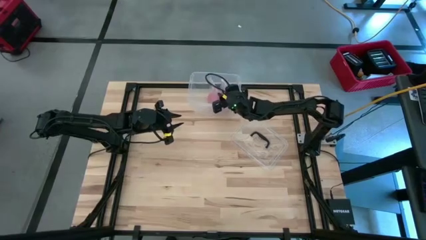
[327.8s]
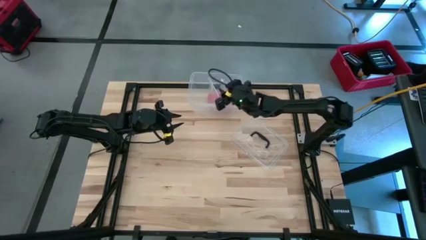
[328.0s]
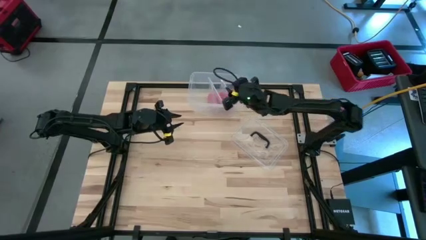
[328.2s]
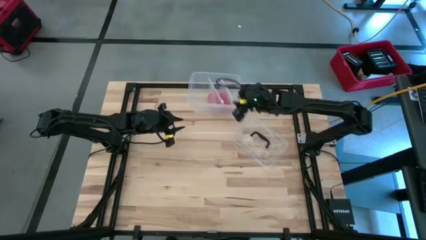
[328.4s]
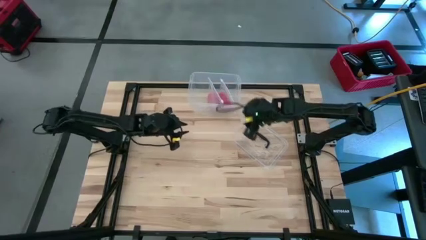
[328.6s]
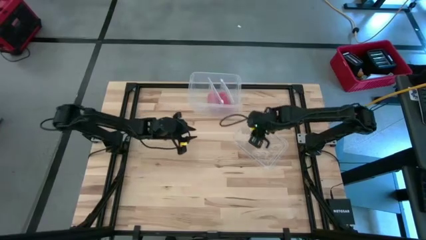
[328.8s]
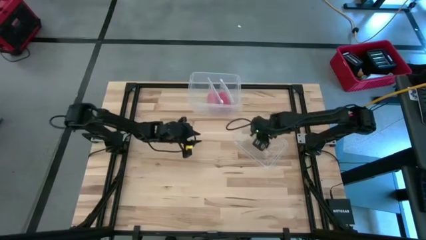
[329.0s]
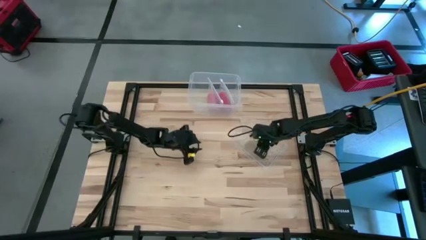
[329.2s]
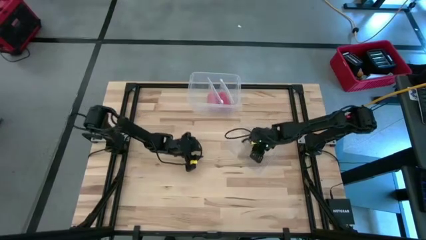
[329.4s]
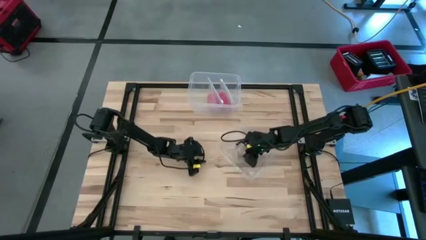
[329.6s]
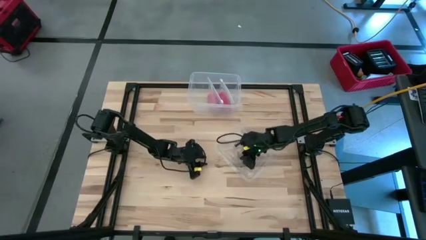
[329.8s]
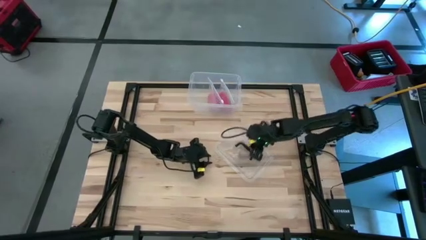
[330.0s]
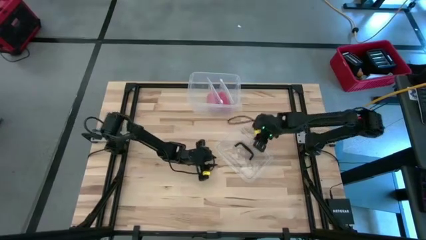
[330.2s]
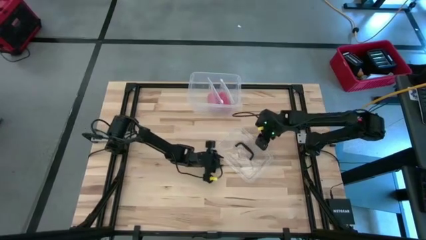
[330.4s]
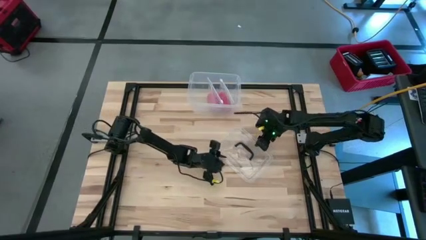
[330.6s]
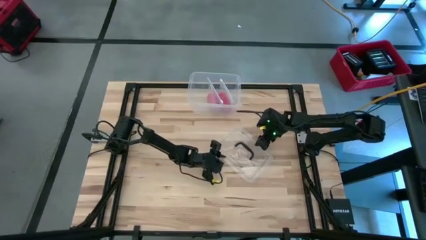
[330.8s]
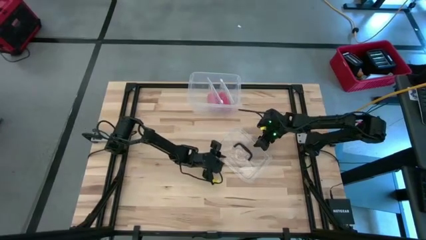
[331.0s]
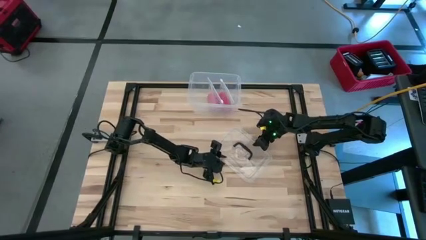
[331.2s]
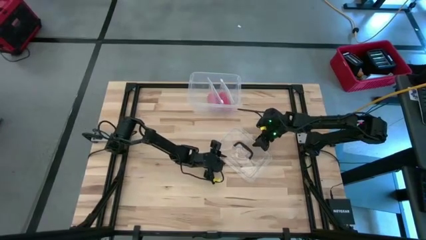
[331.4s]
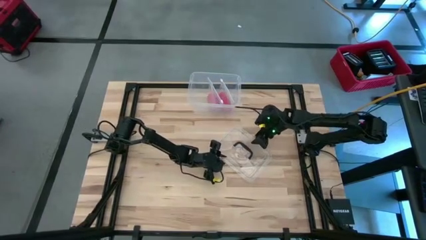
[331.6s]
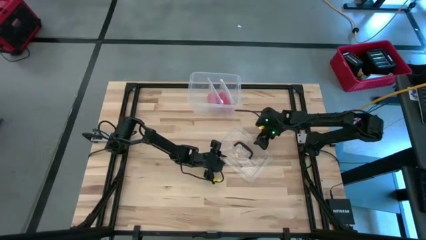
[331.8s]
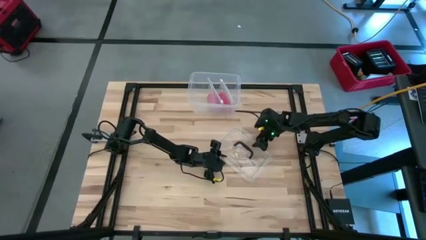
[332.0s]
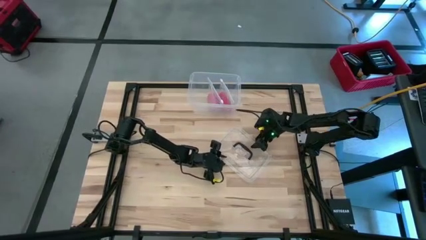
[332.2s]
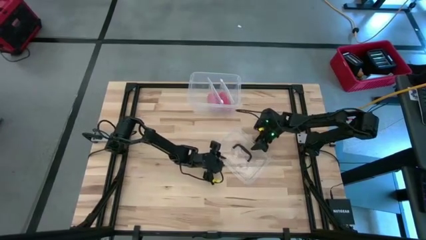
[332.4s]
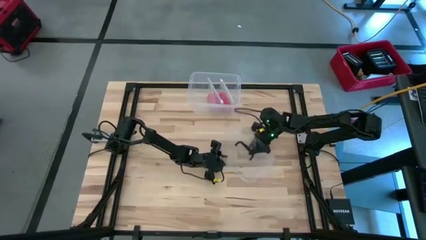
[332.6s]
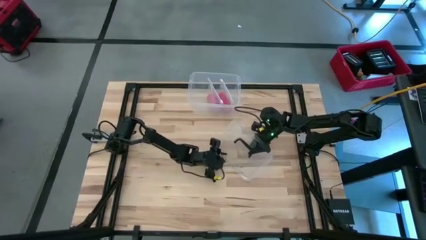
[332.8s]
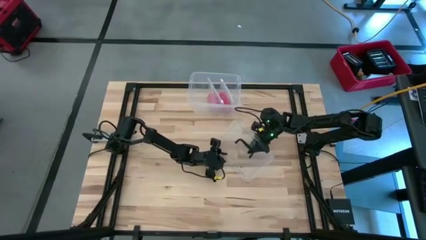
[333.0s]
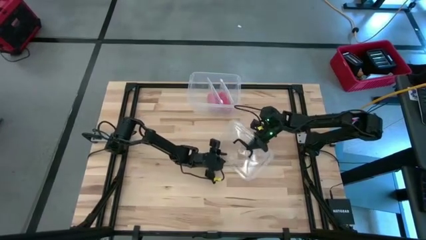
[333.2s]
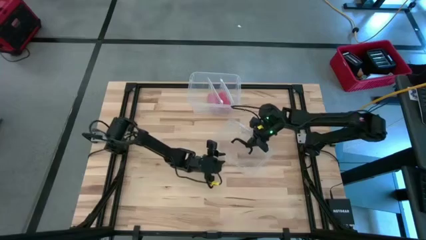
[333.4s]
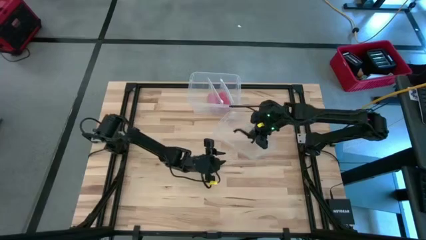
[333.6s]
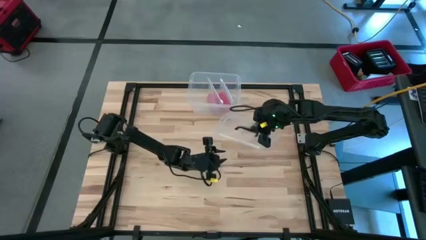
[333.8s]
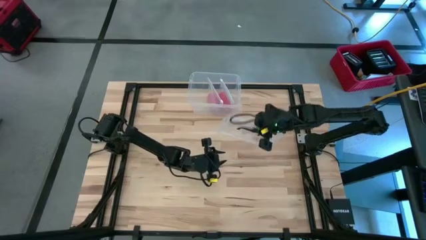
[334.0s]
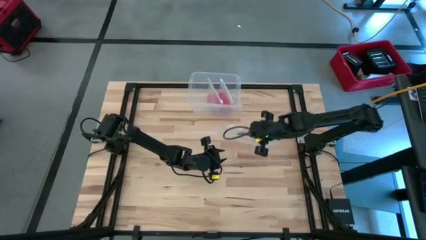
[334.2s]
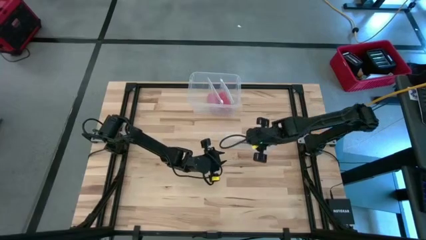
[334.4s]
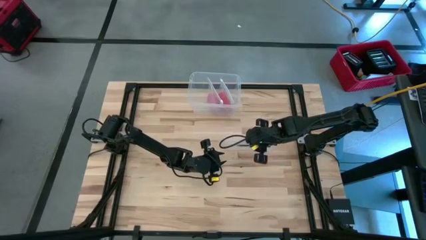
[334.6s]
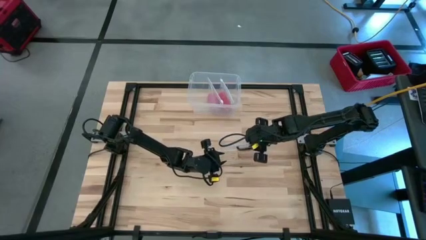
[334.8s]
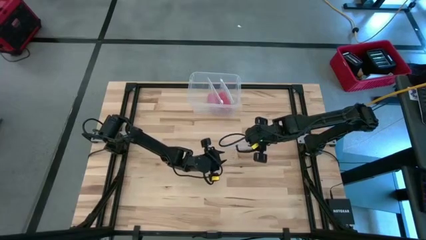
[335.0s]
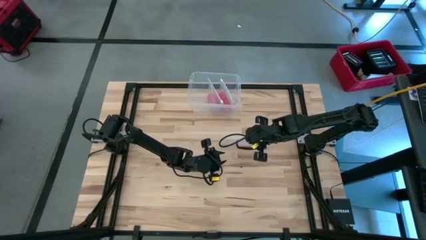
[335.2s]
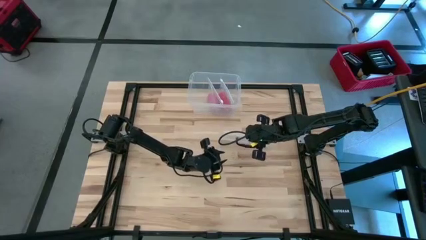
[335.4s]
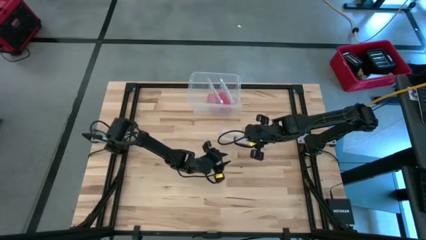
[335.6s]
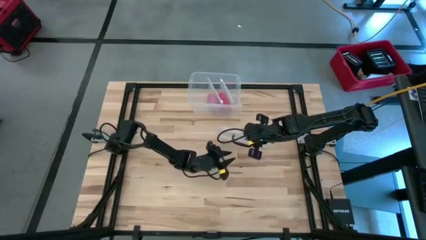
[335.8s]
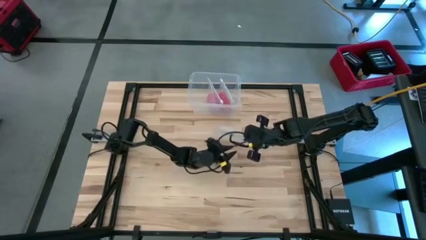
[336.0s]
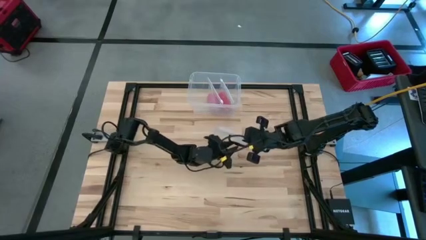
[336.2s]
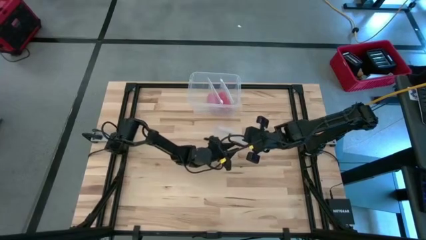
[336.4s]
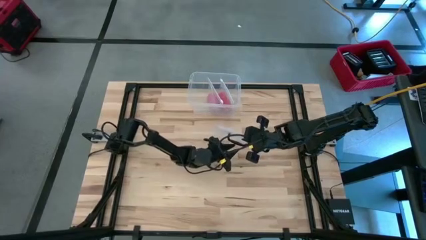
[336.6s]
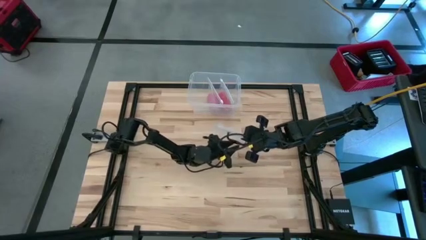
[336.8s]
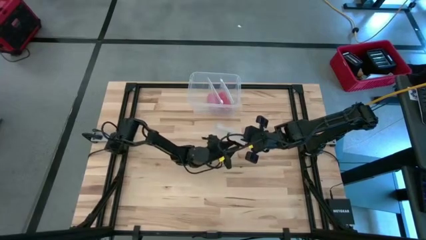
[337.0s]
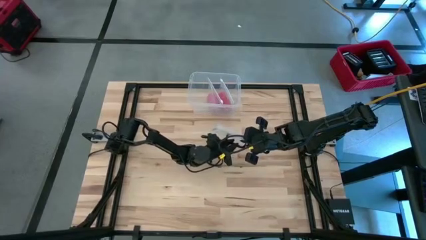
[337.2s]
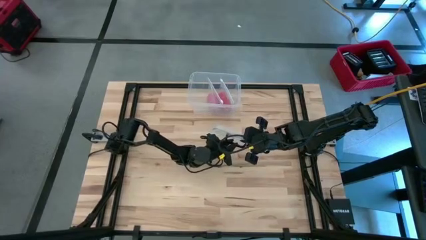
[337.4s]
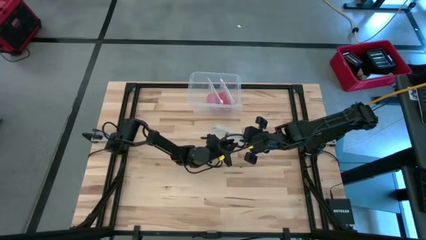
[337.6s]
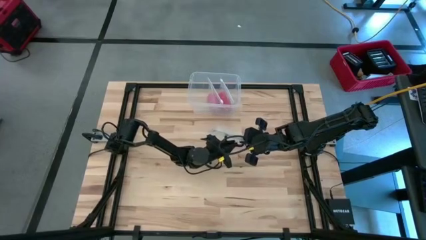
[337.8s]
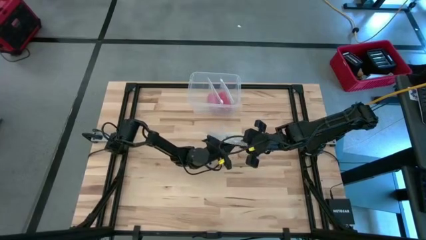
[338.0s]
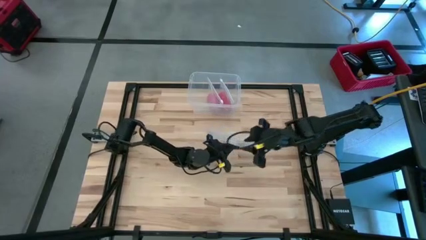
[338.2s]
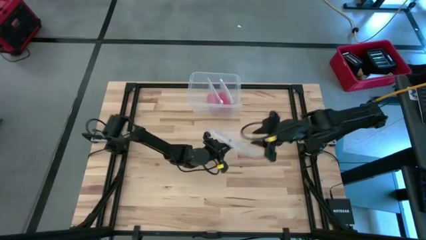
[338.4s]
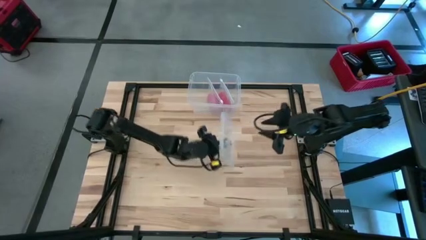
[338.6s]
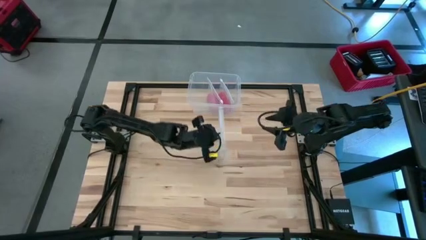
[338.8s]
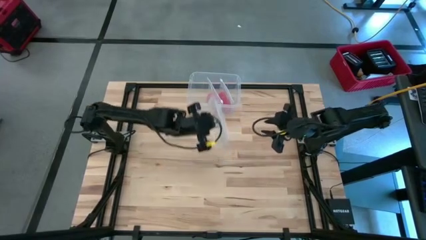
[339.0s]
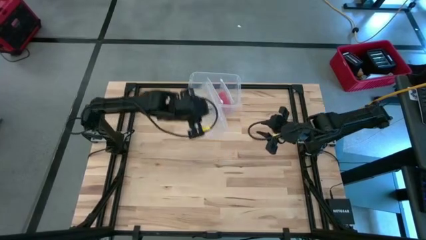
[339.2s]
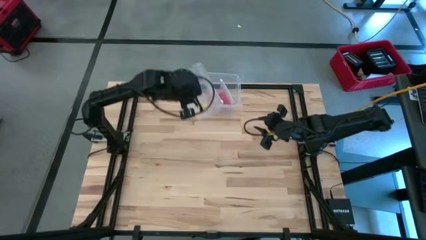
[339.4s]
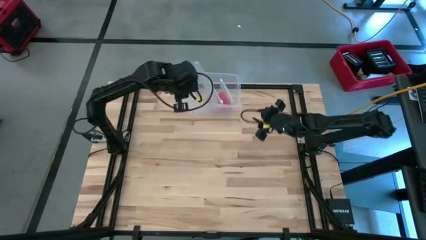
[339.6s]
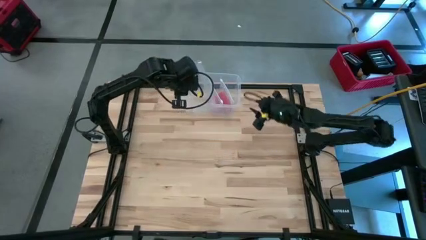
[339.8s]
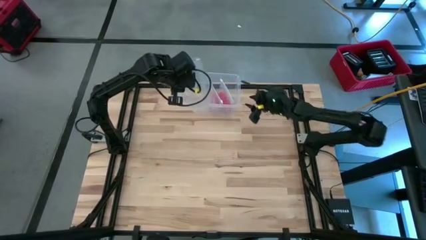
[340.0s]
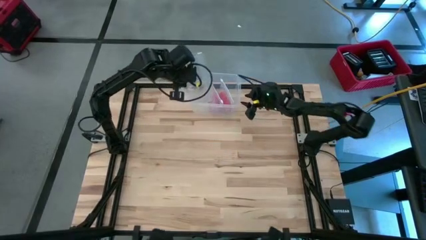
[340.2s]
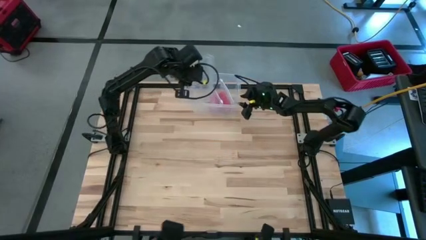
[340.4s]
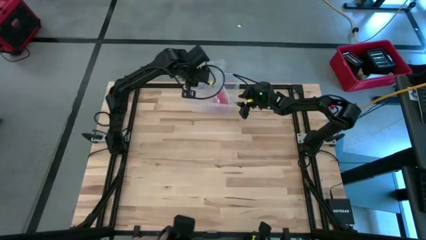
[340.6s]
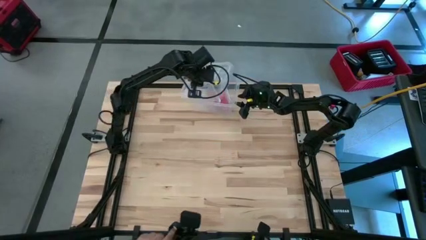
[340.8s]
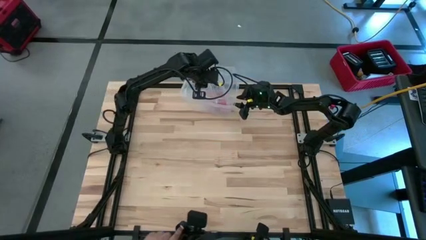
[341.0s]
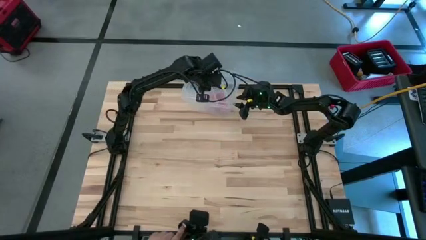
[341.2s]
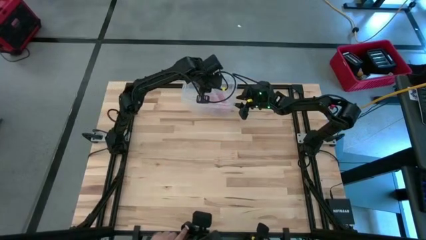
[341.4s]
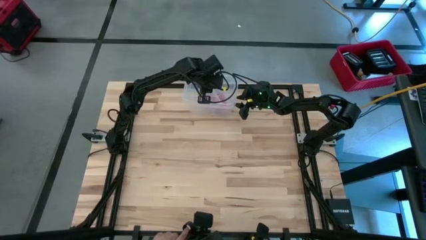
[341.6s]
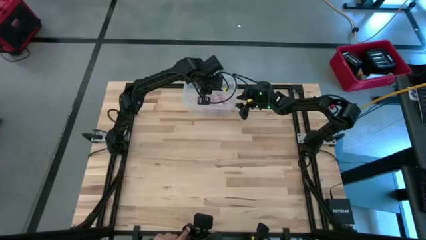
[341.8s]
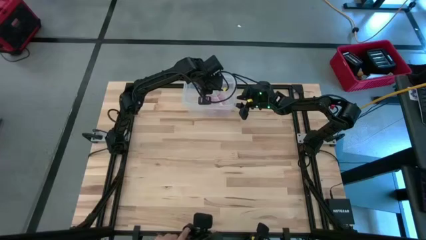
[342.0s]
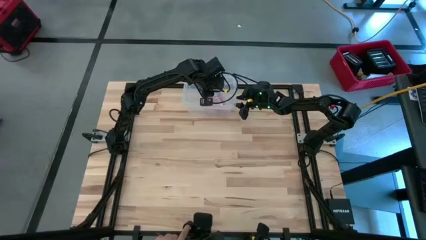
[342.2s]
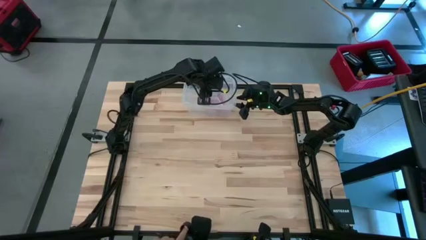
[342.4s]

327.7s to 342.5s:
Task: Roll bandage
Close the transparent bin lid

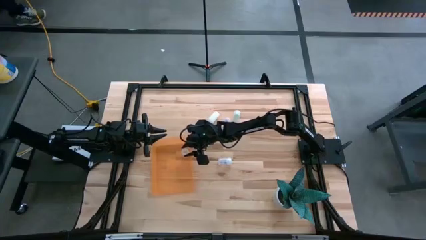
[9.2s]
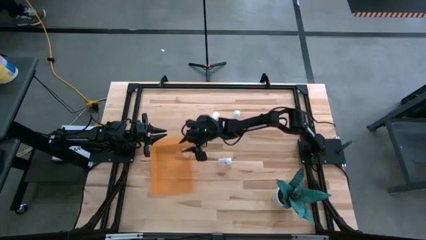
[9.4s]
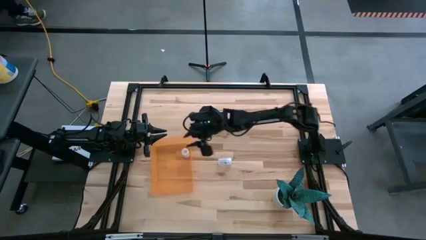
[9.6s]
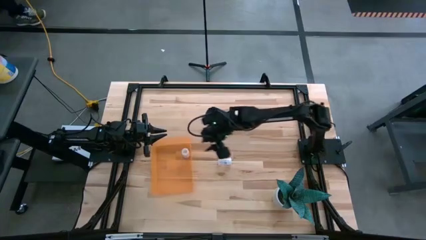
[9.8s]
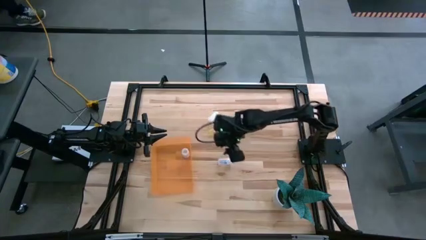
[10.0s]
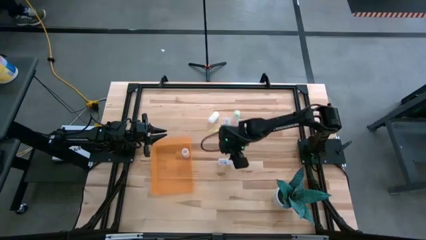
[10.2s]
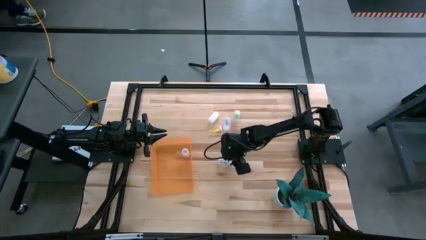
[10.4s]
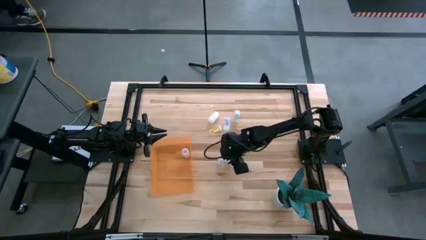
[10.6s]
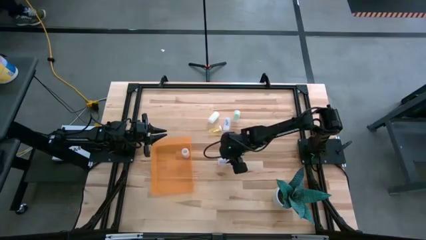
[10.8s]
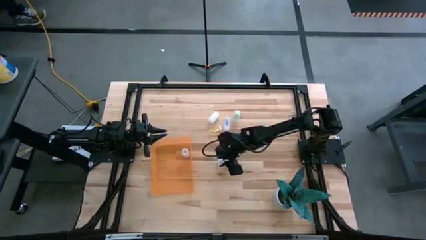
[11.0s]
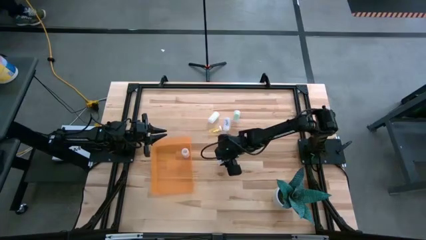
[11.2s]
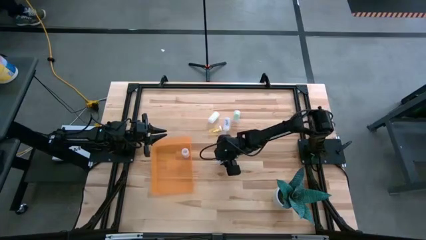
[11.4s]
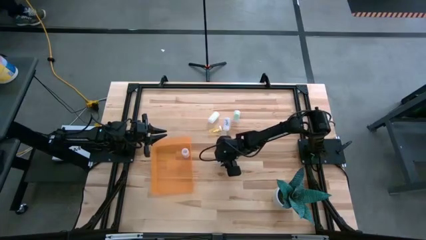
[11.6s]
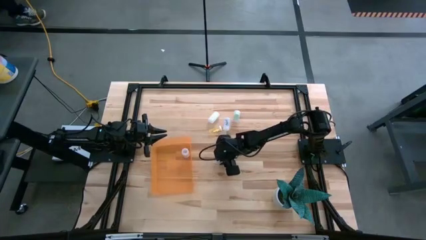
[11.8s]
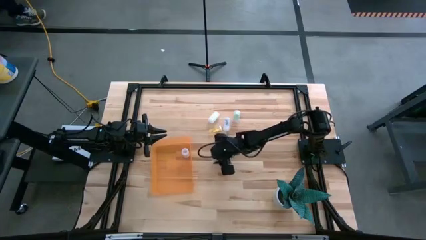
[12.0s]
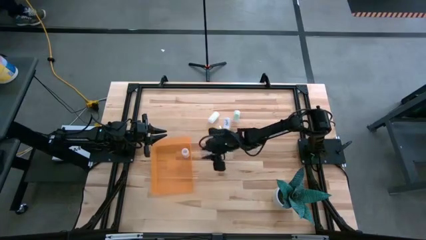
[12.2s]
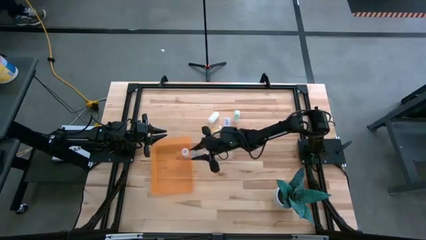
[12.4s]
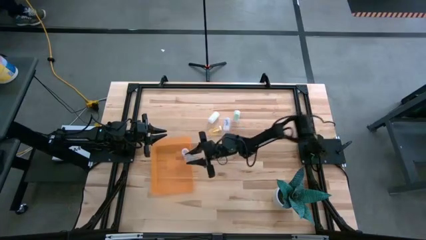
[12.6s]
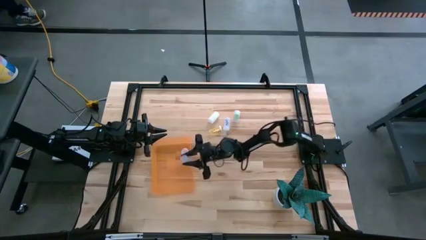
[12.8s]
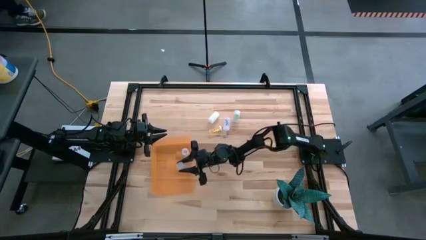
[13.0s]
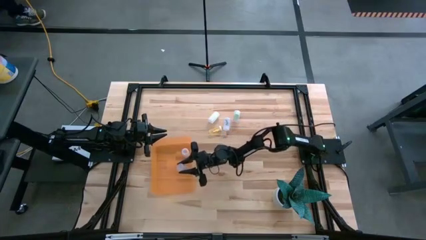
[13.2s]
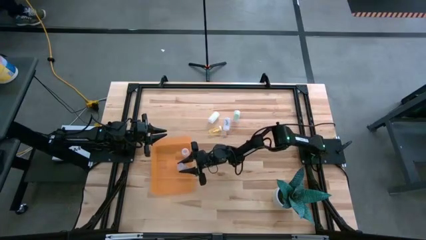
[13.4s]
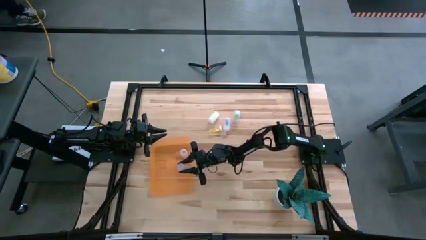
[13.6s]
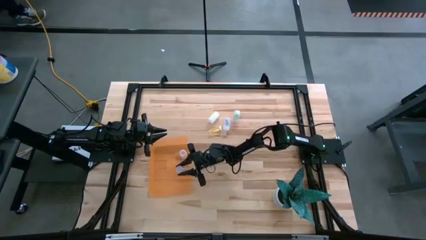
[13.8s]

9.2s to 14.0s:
Task: Pick and place pill bottles into a basket
Put the bottom transparent pill bottle into the orange bin
